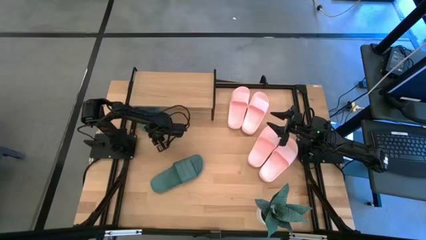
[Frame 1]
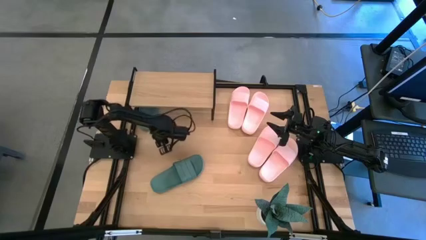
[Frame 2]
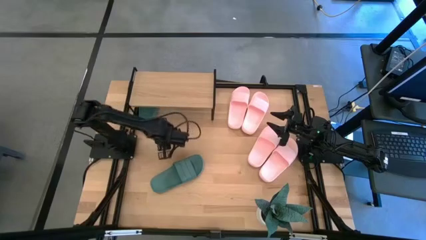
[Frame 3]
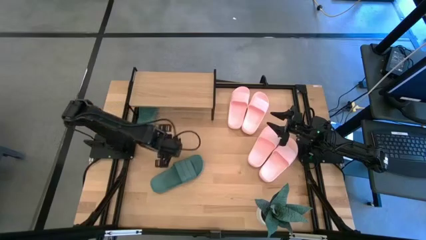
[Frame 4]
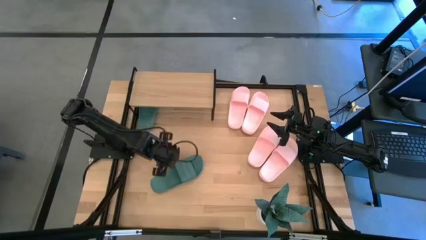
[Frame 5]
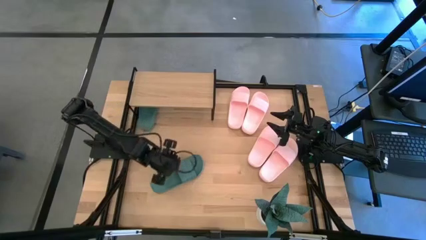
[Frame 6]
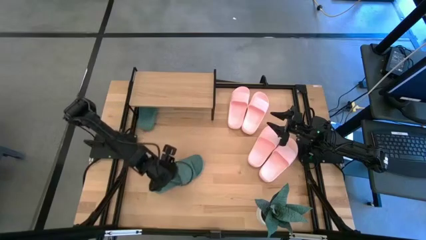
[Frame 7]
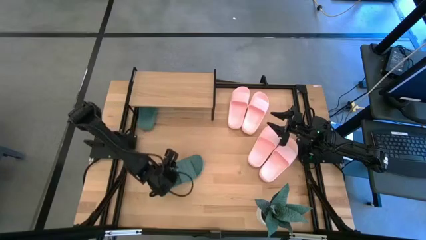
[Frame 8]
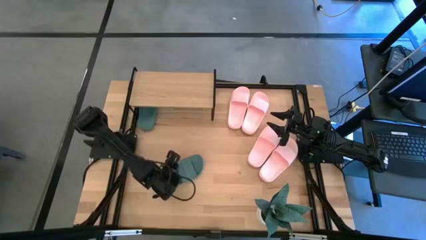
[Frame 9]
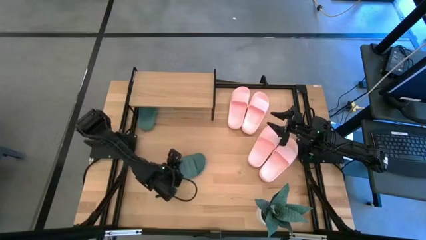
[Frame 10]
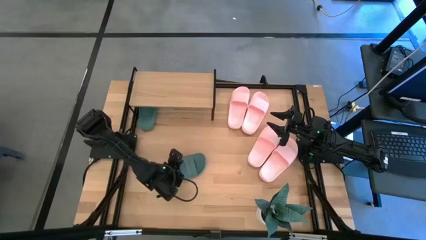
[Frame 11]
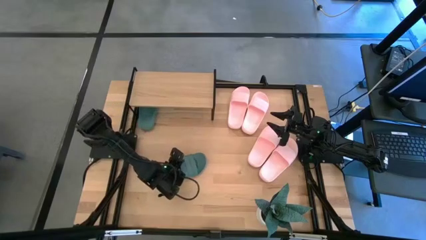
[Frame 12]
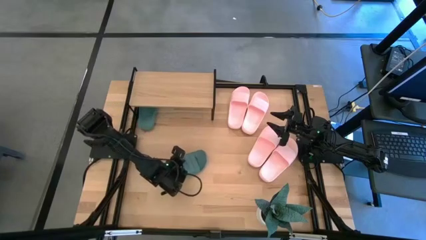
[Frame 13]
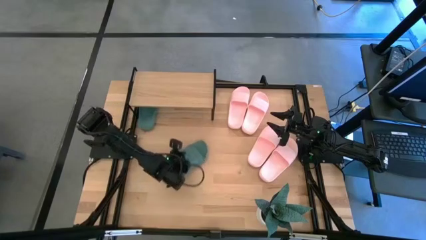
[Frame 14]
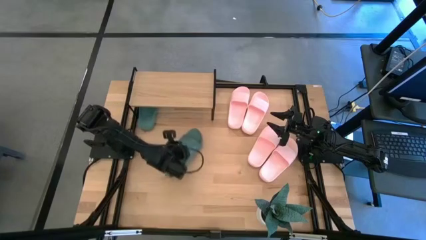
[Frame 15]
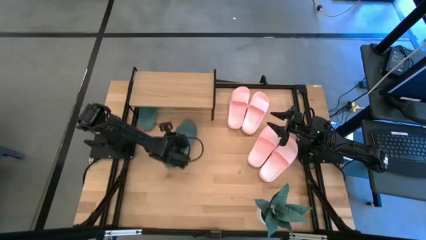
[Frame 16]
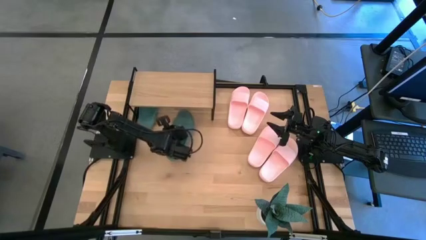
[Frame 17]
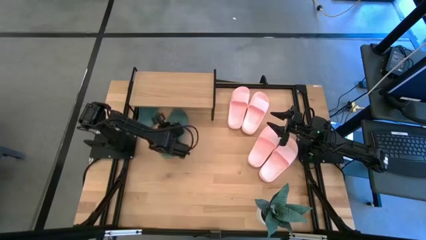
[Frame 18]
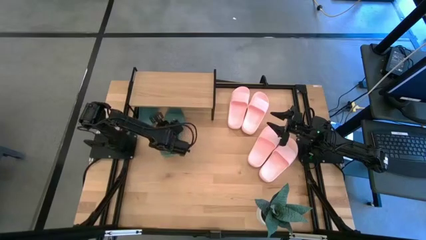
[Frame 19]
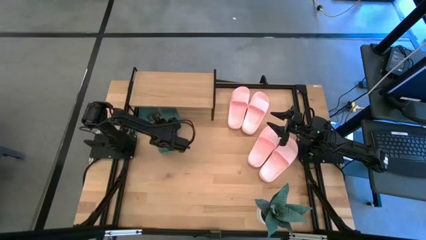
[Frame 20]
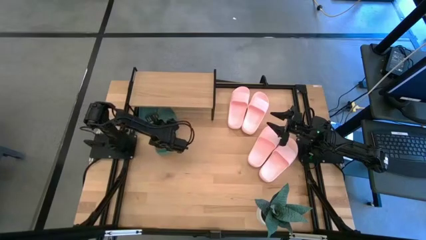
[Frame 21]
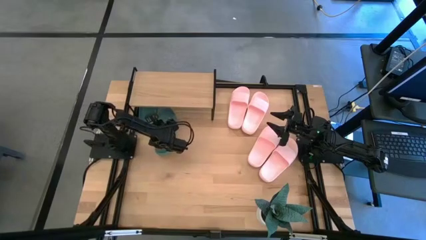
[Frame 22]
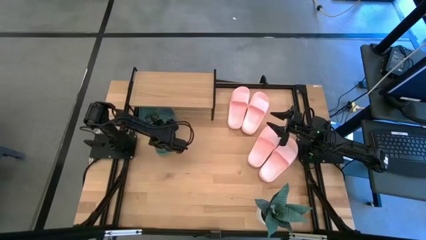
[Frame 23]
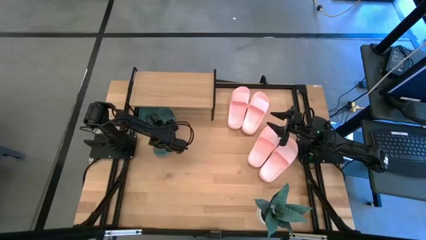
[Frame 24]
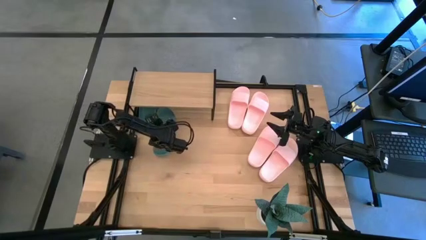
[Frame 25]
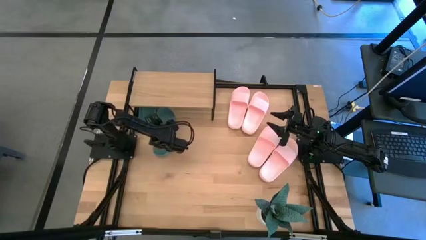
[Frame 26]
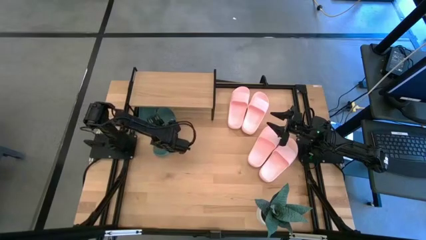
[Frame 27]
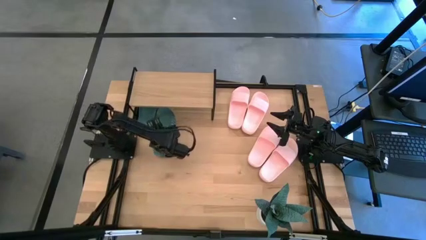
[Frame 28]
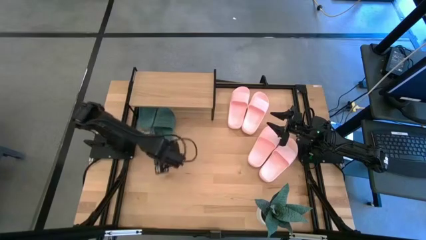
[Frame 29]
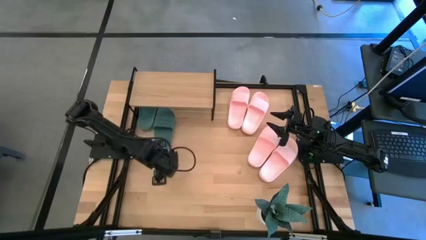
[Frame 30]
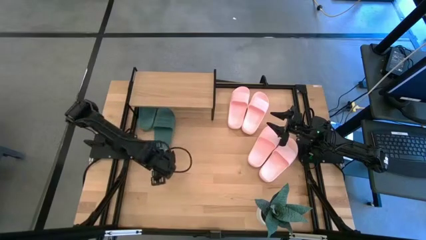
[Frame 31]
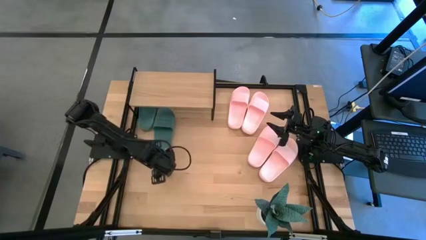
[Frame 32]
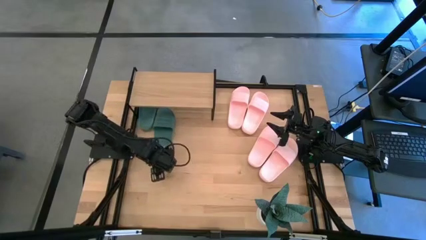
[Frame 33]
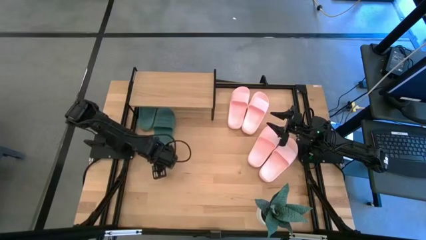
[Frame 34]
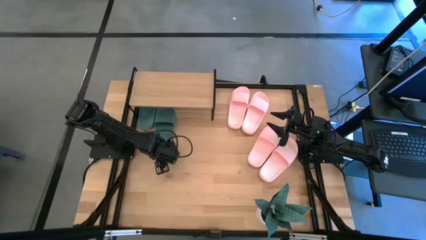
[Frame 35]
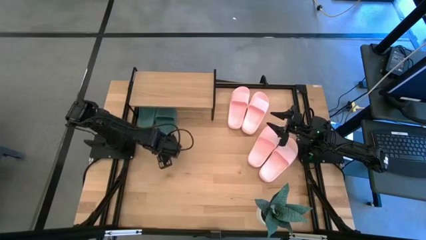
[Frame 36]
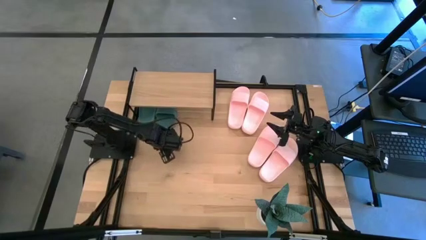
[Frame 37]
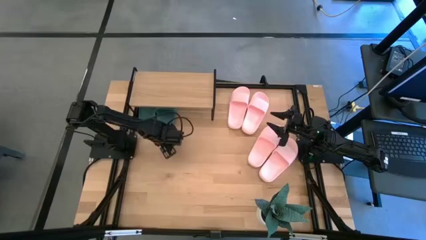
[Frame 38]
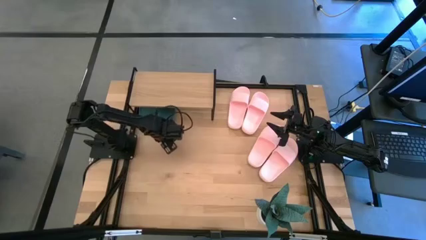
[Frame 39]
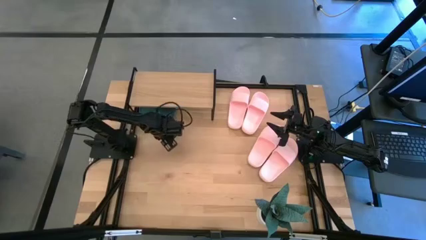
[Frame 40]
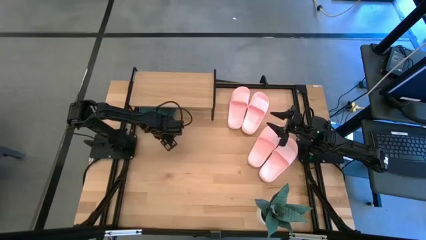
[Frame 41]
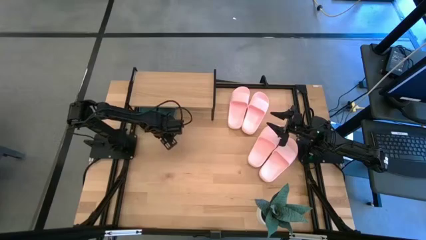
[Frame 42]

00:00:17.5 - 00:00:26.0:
Task: Pick and place slides into the shelf
Put the green slide under the shelf

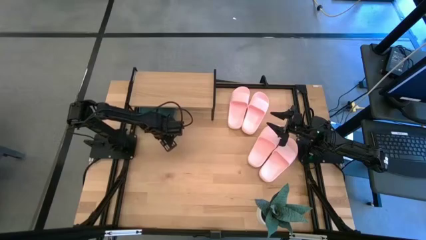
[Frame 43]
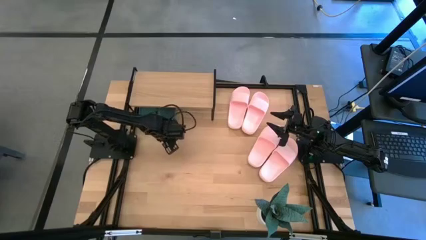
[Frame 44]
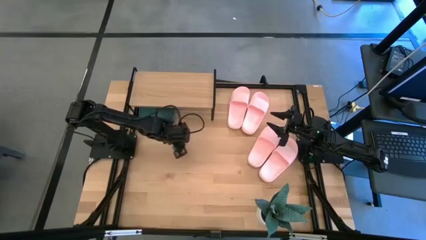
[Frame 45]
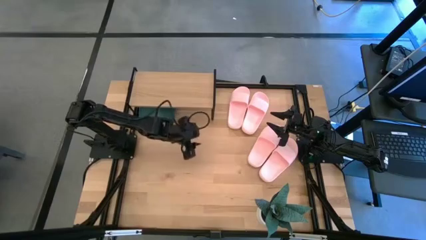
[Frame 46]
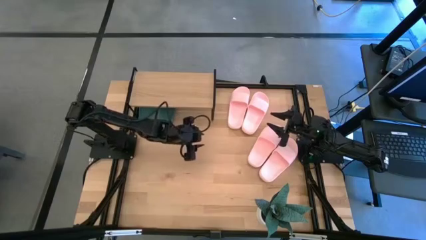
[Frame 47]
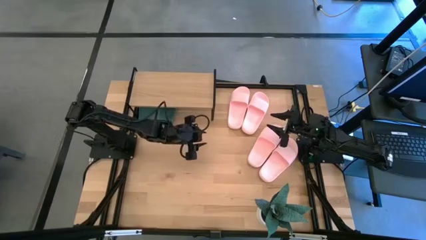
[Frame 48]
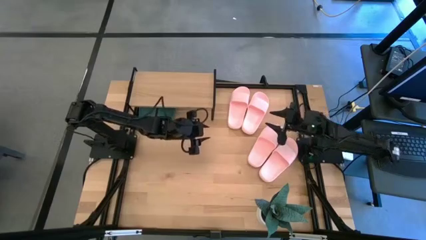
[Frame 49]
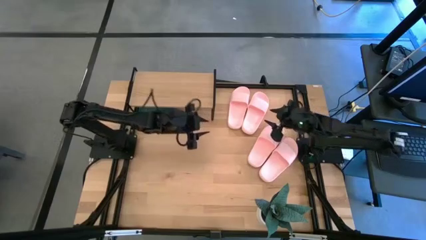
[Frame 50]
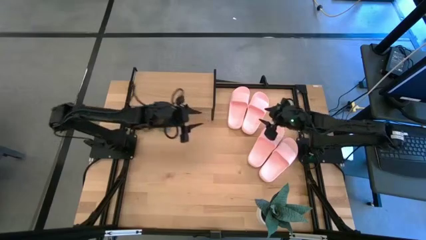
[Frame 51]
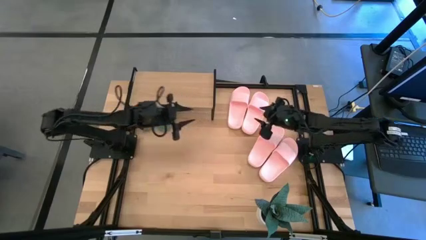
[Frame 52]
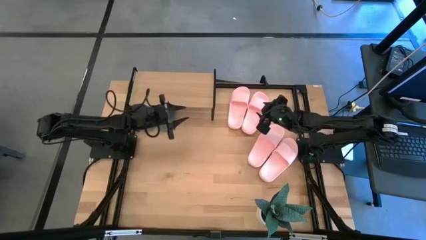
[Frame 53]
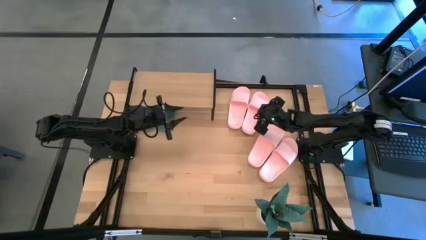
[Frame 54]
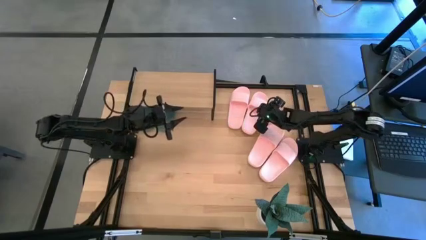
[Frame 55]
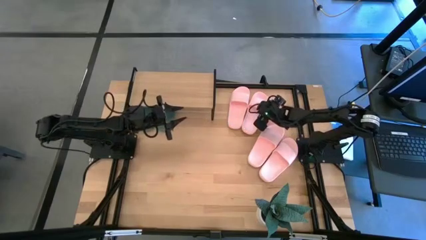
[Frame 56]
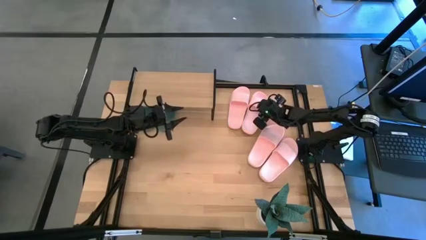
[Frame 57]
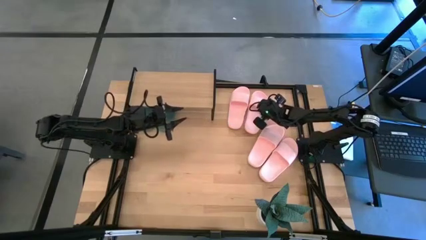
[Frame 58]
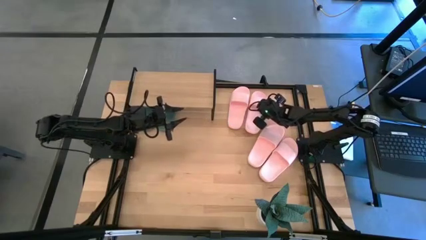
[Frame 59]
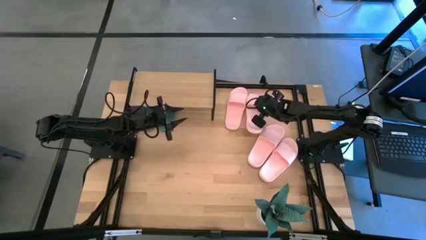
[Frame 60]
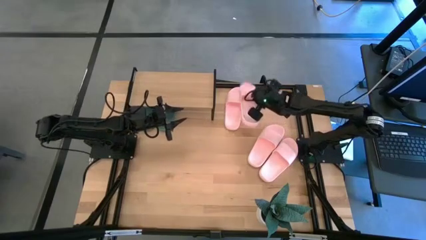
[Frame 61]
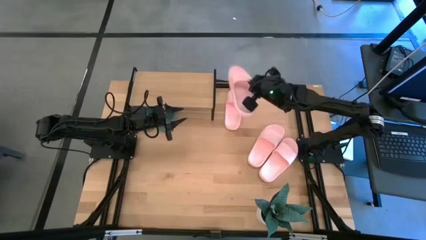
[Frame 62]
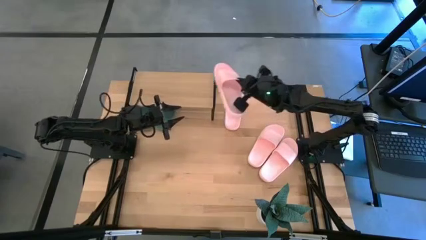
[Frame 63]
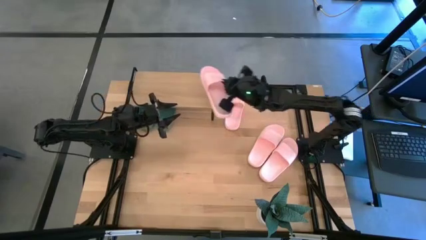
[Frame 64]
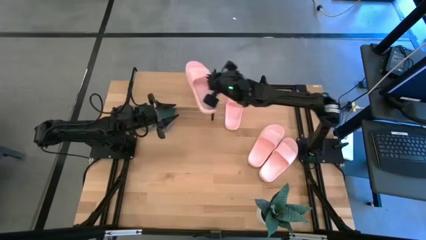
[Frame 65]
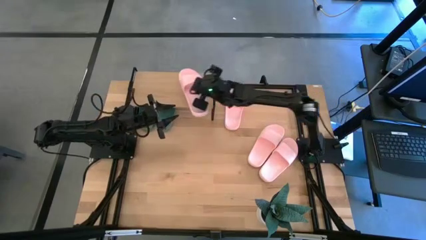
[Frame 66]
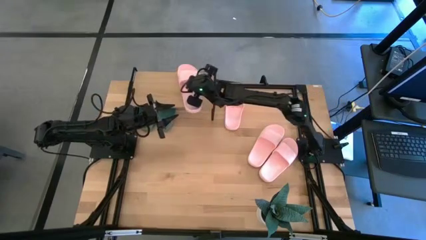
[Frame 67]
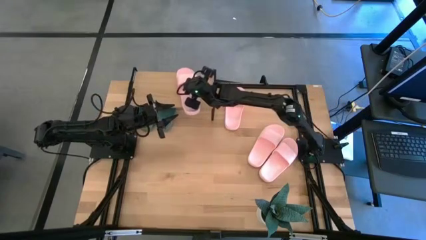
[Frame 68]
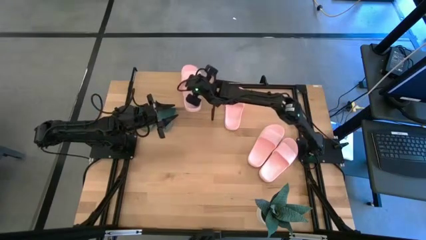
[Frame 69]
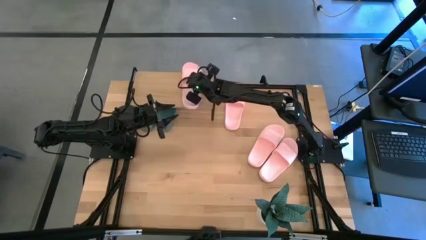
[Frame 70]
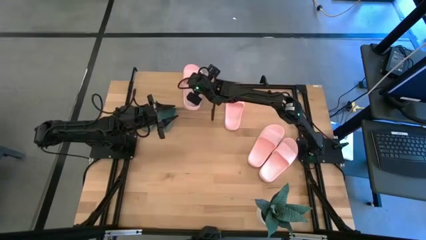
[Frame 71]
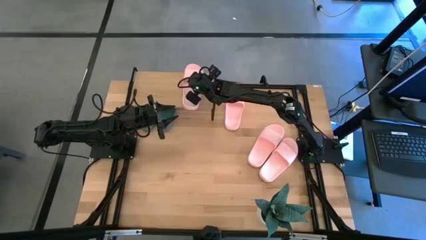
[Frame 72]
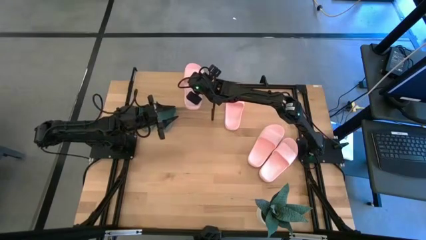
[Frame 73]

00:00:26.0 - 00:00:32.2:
Put the pink slide on the shelf

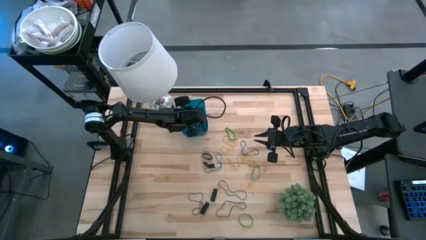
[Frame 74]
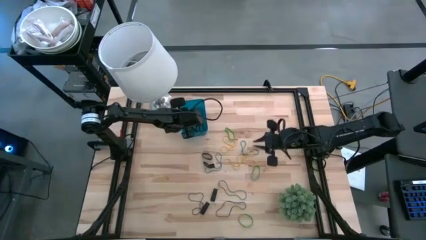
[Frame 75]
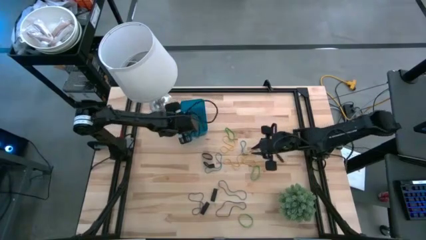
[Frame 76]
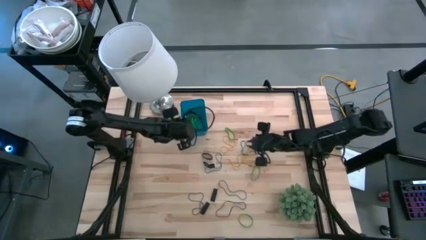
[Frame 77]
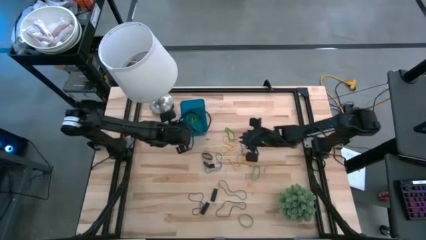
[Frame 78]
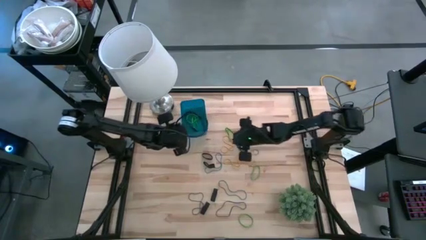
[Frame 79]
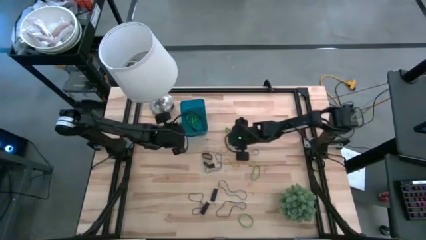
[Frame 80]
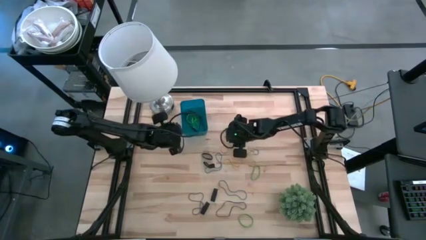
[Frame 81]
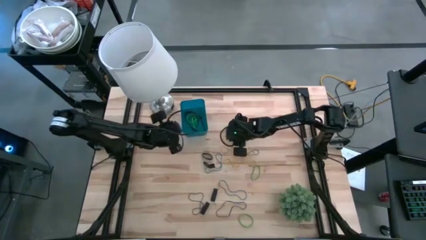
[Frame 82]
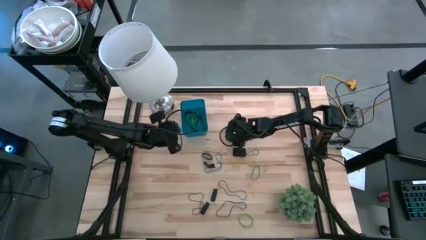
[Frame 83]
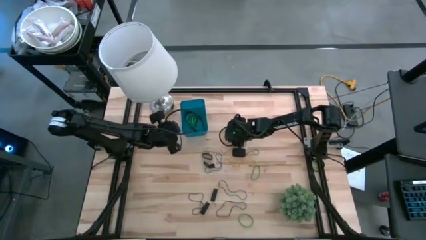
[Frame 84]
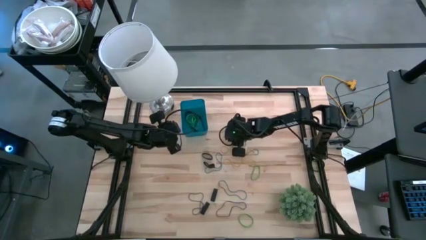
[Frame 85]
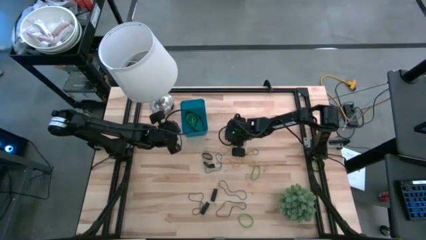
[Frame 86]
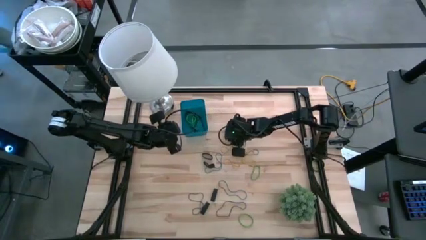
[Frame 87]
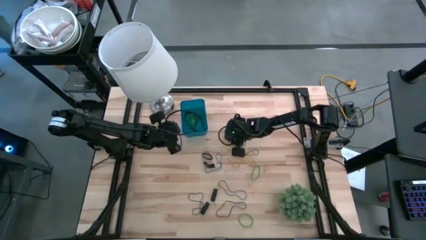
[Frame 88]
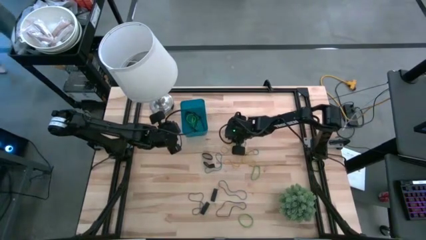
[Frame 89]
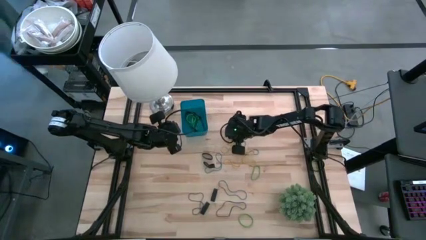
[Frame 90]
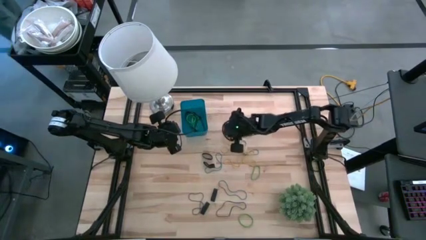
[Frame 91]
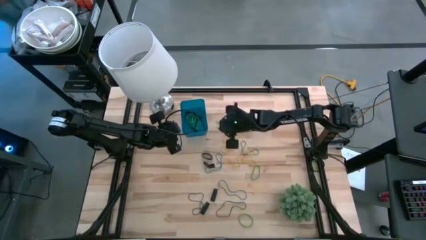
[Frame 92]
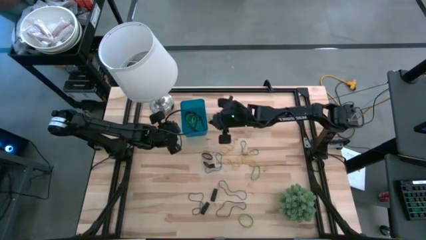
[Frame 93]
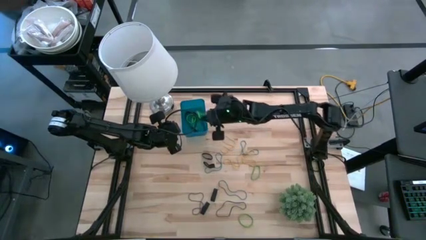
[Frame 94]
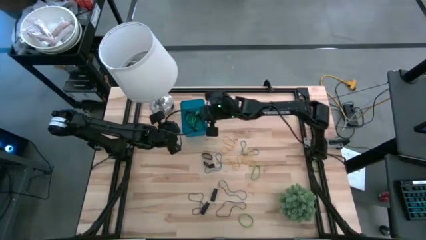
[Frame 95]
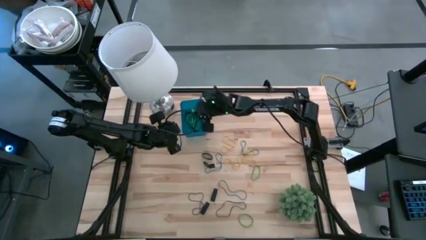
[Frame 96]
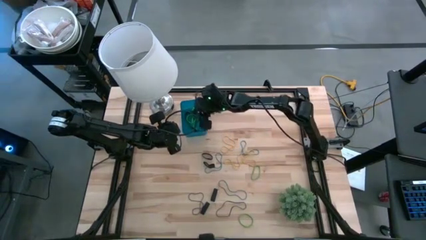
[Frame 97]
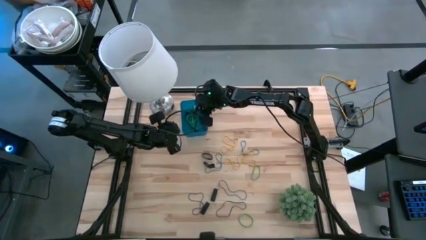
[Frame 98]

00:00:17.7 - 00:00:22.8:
Task: Pick and place rubber bands into bin
Put the top green rubber band into the blue bin
